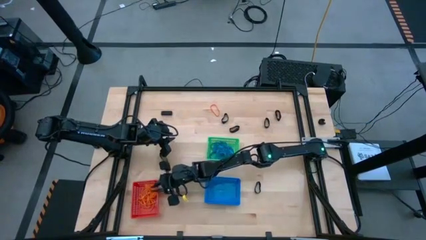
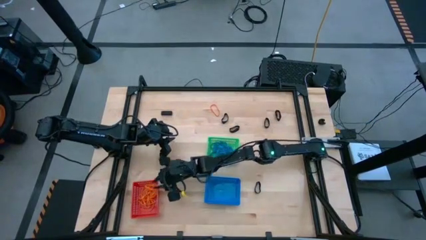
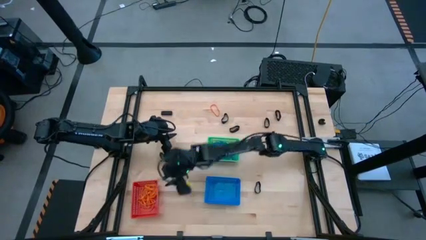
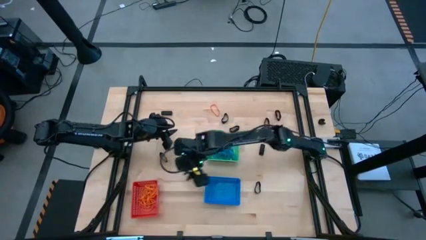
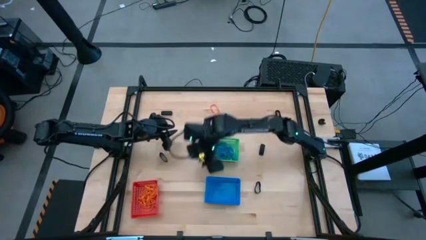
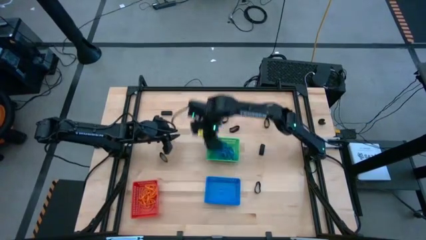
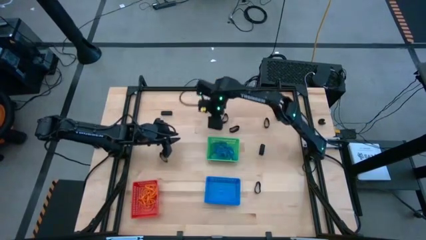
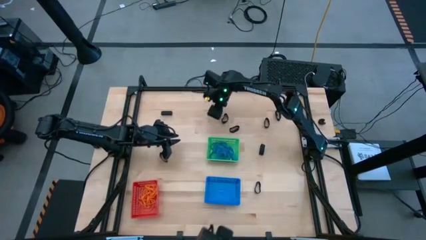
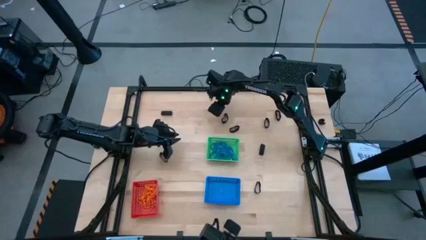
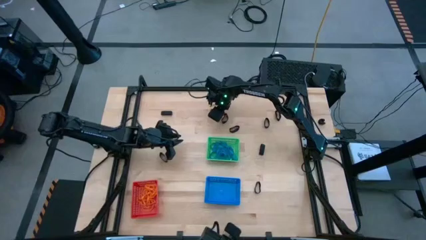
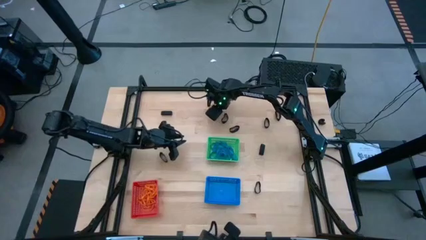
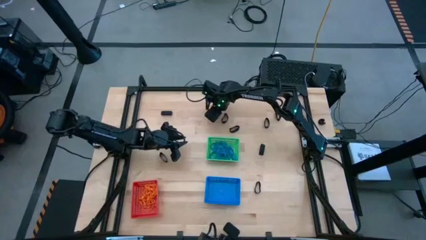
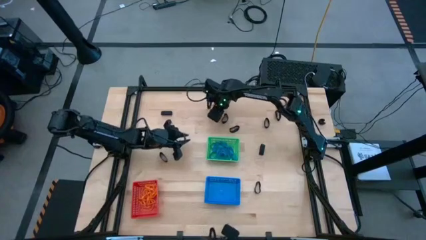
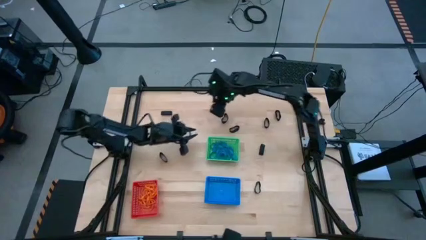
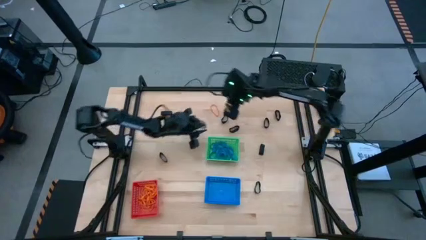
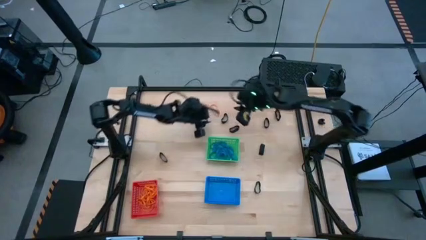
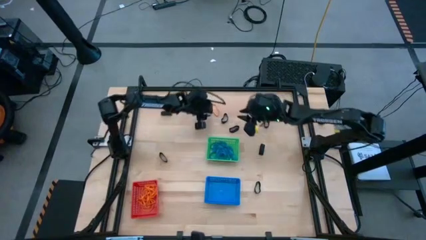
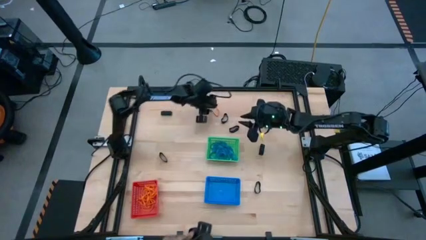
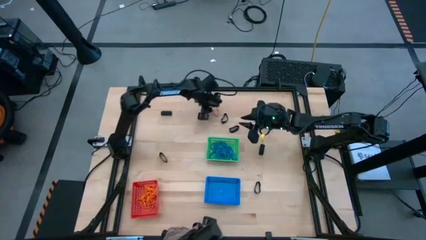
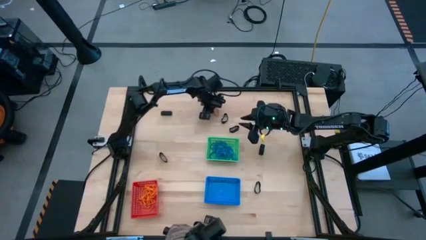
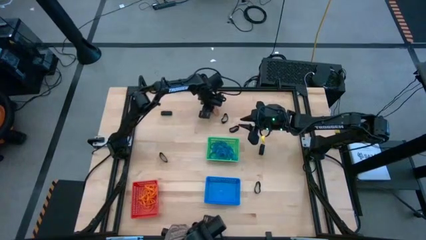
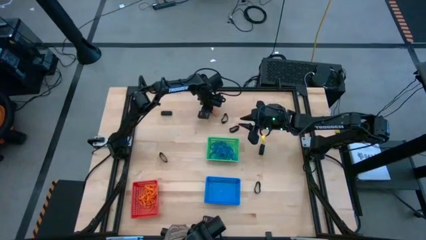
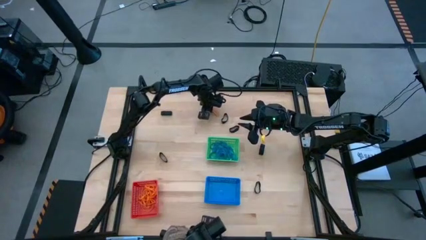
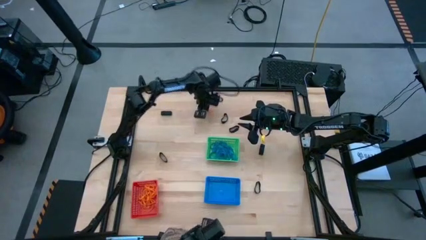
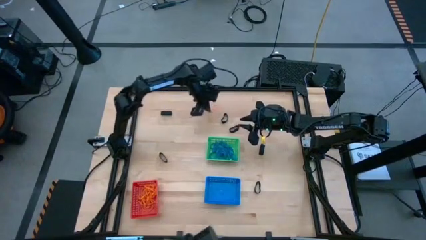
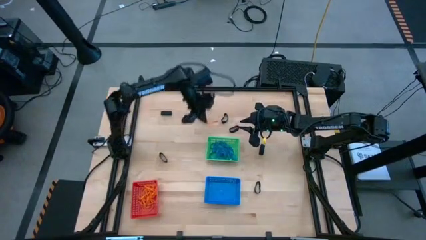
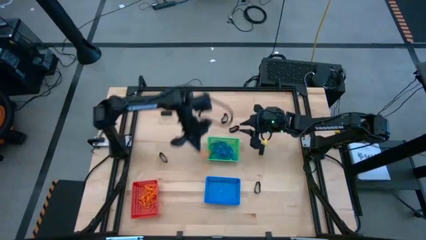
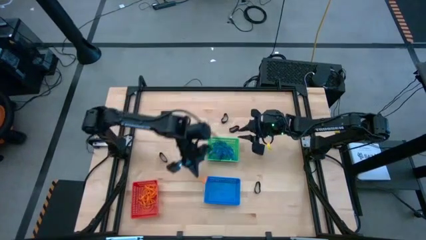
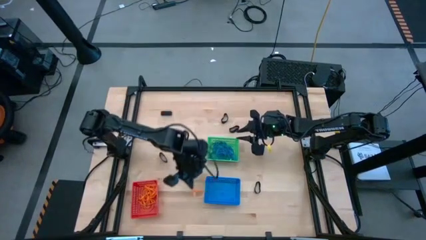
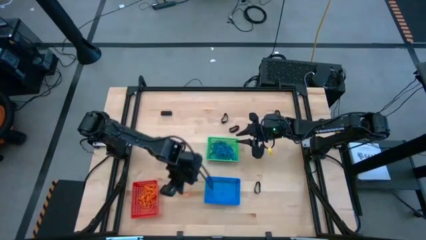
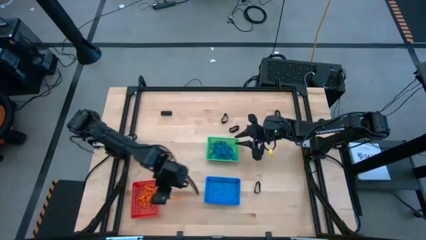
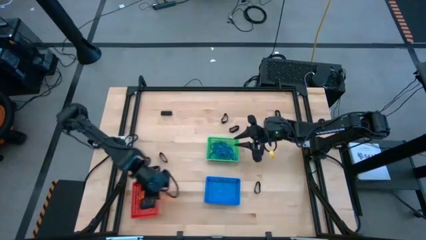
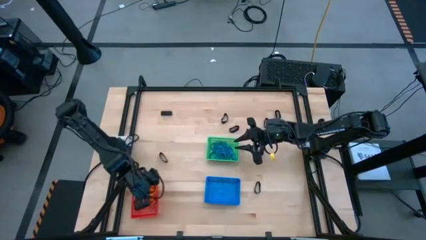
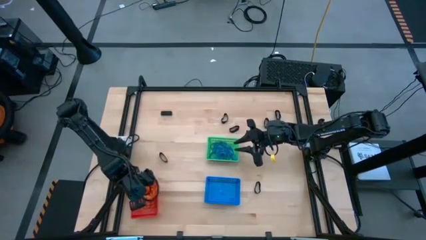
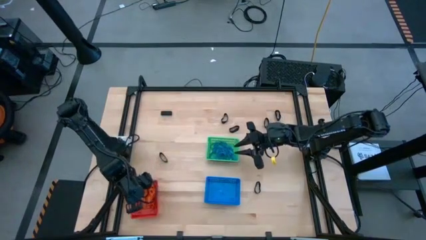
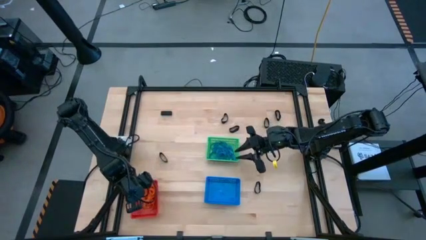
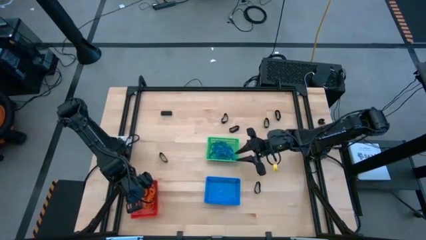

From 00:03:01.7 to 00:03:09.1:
Task: Sort rubber bands into baskets
Put the orange rubberband into the red bin

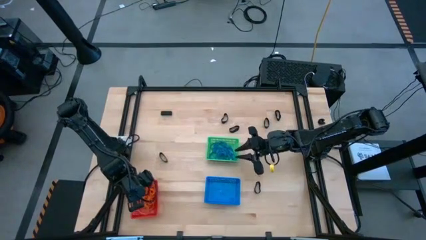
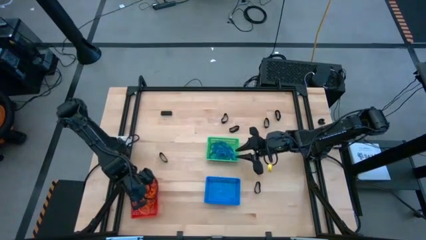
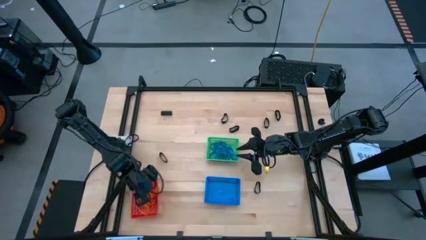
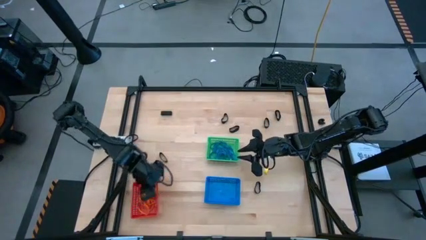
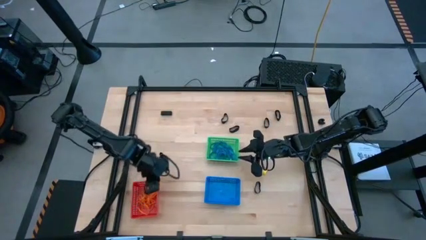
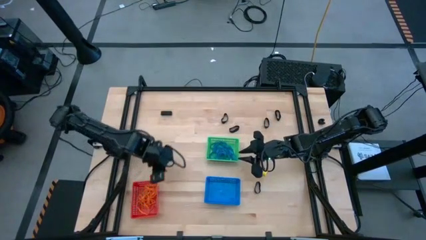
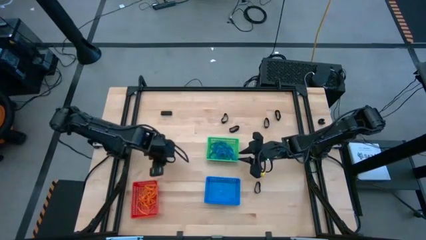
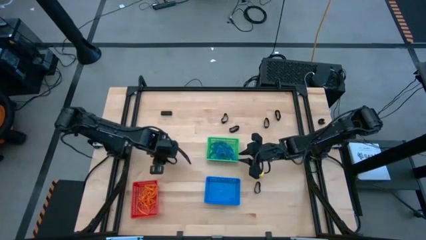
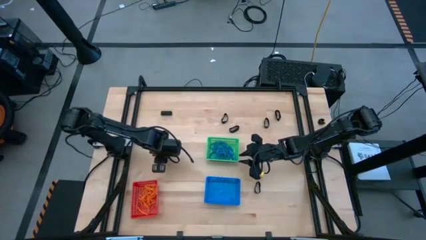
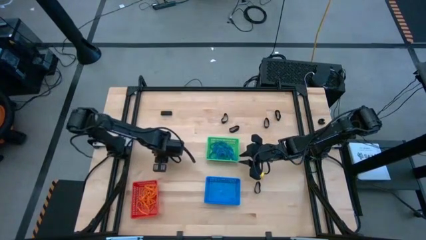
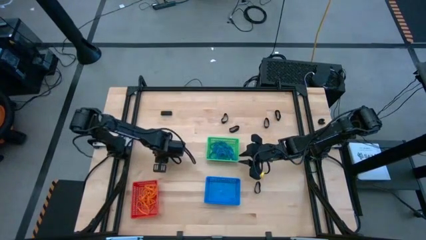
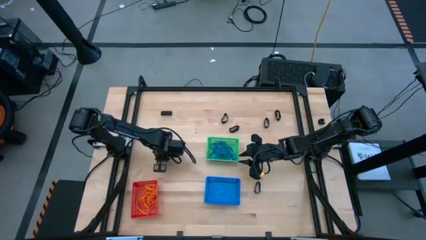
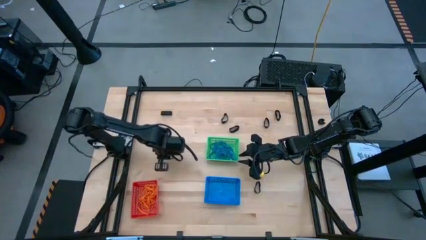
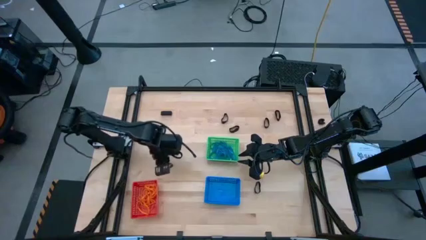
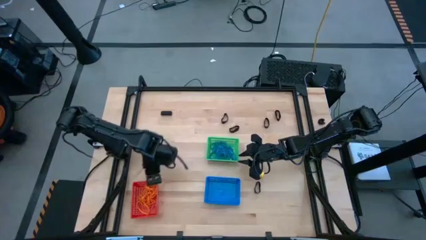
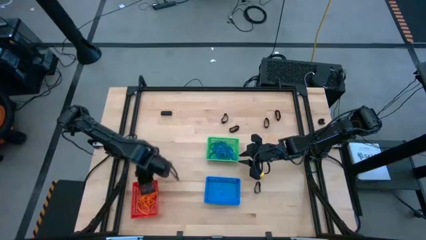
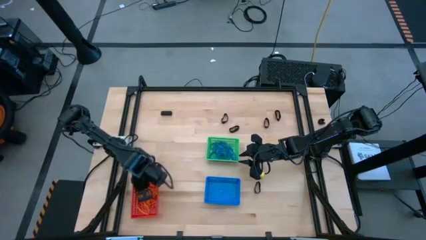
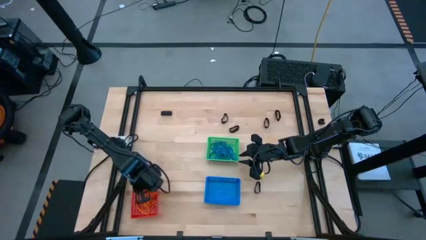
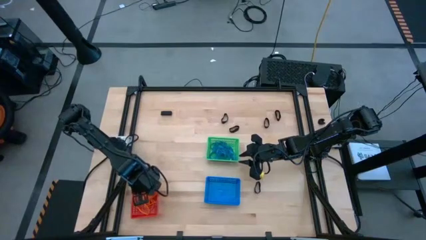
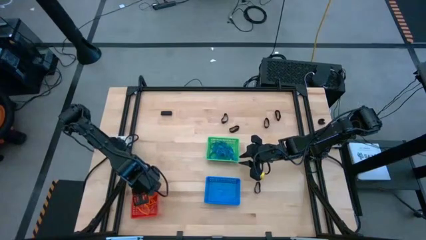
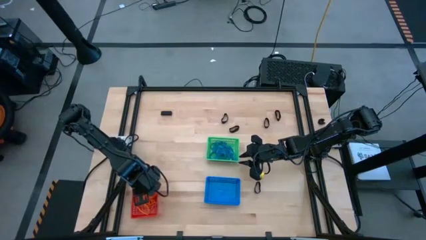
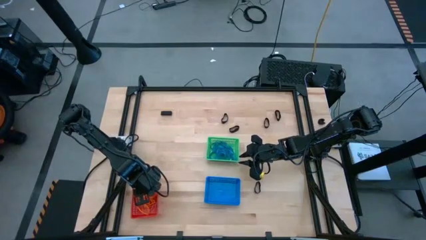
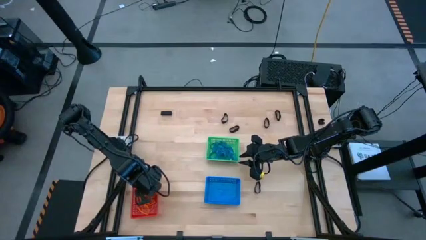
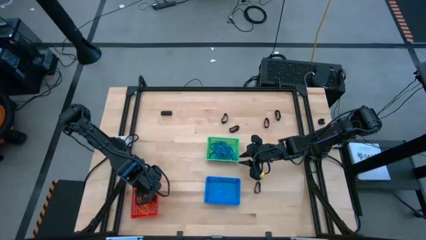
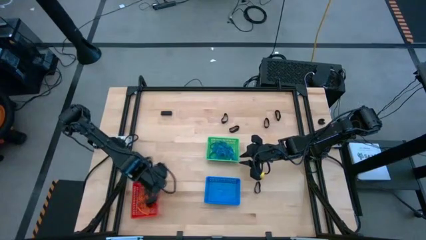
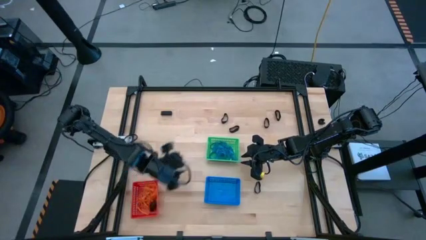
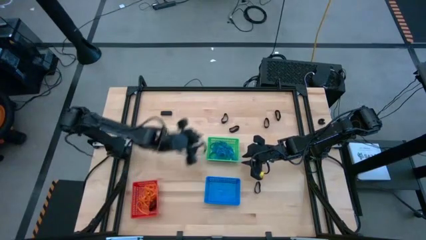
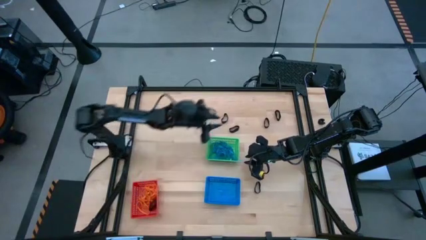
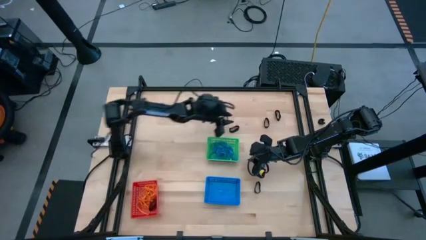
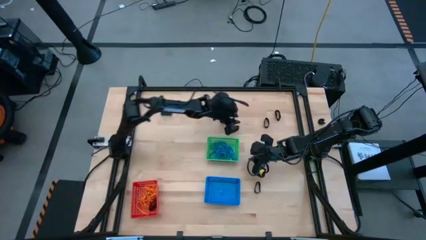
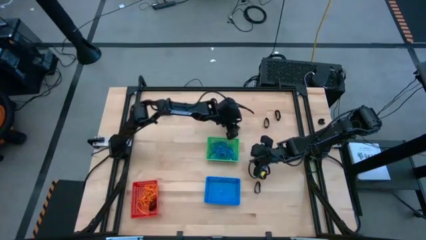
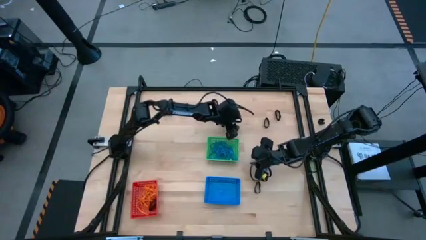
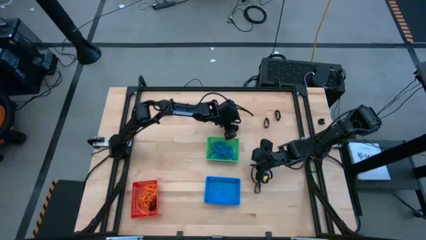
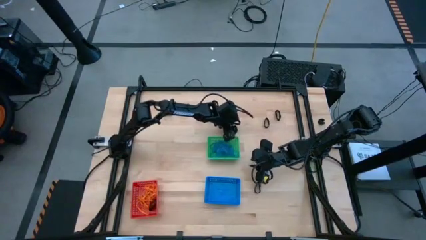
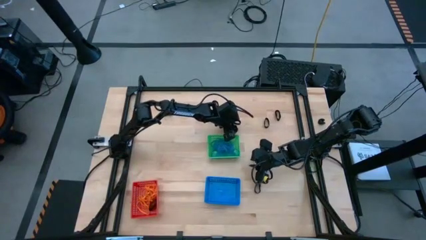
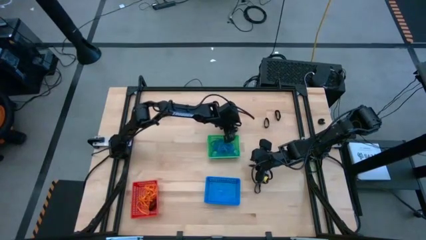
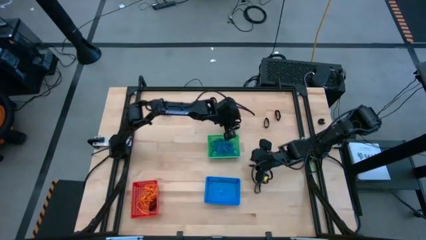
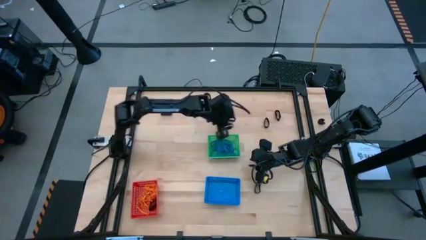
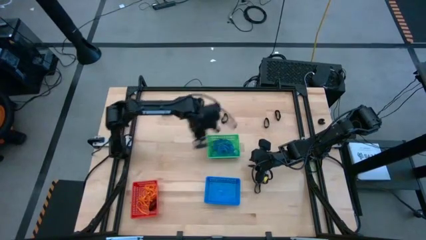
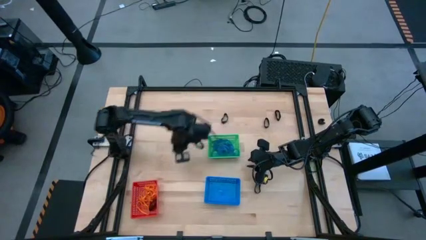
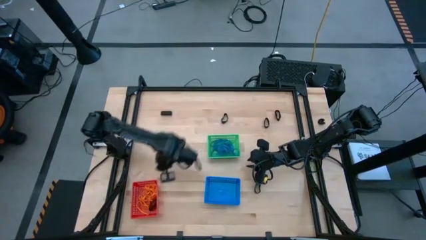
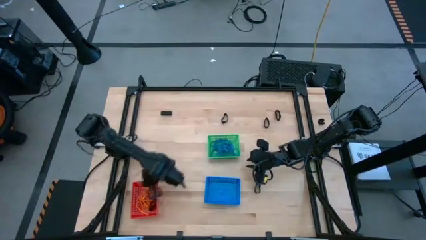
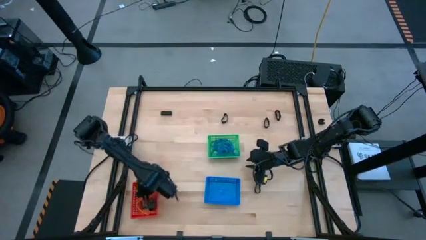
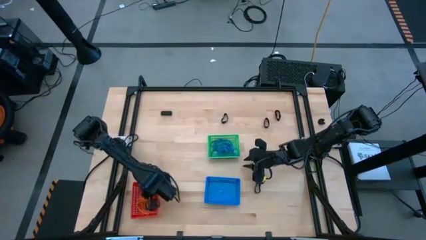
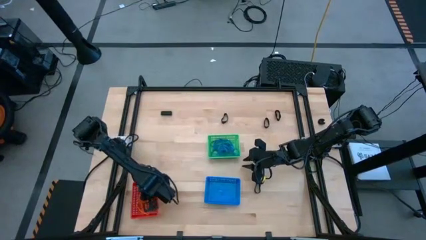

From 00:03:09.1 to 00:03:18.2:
Put the black rubberband into the red bin
